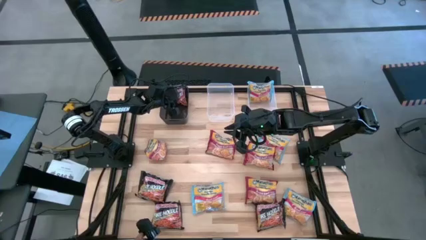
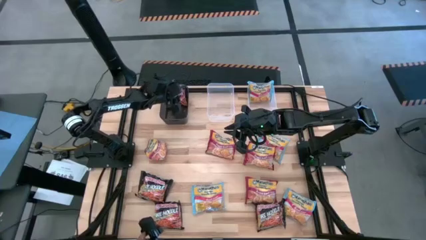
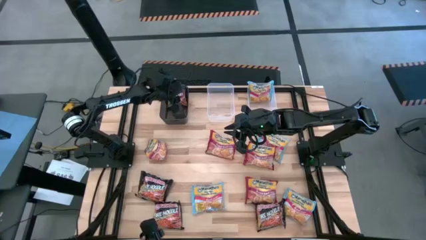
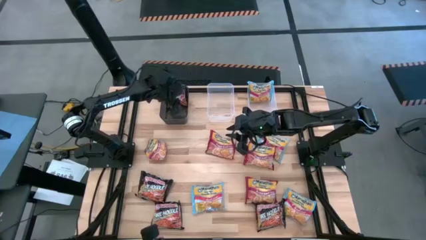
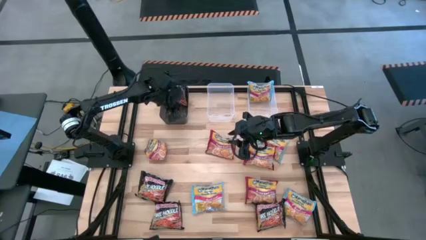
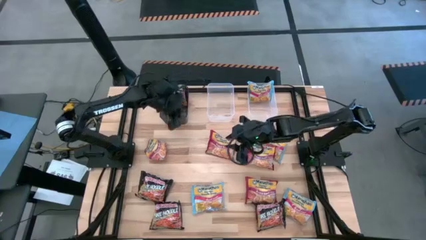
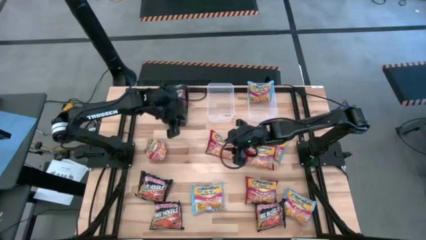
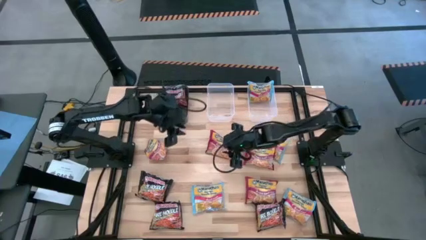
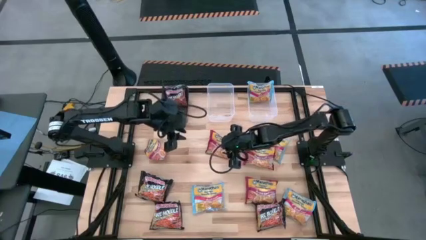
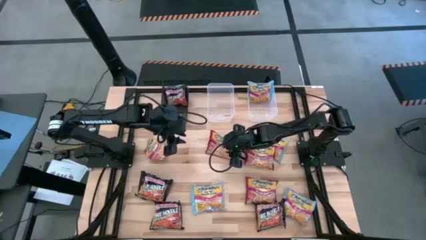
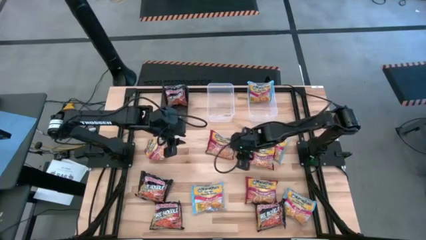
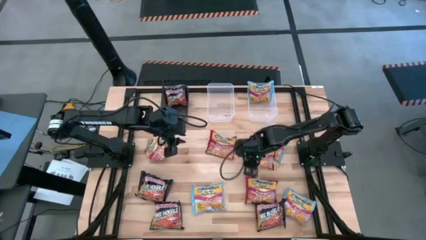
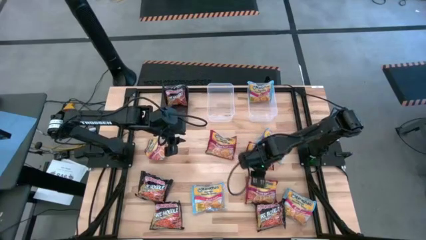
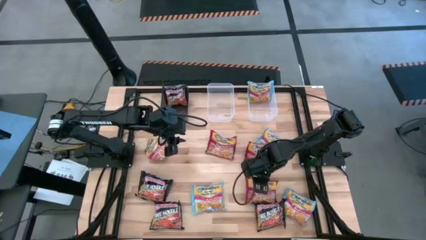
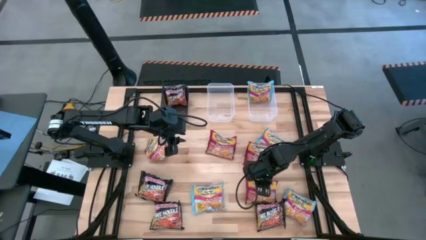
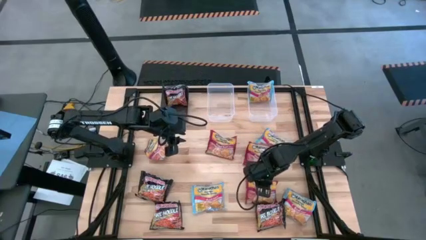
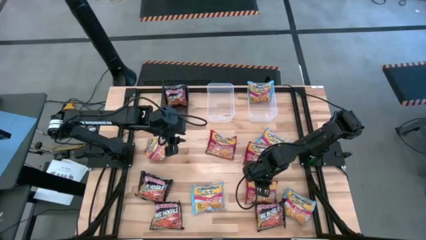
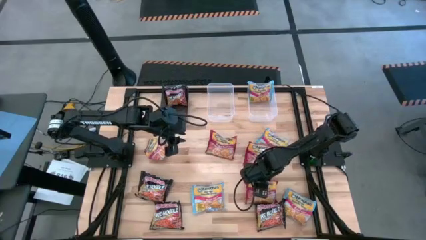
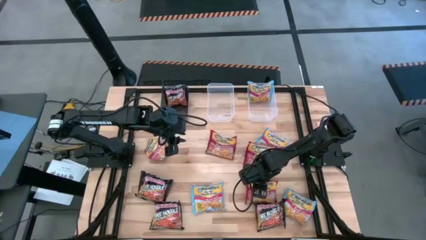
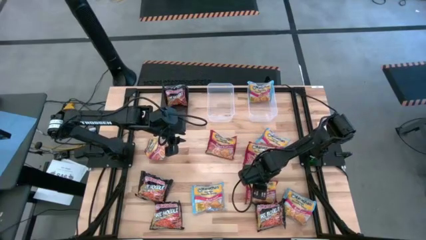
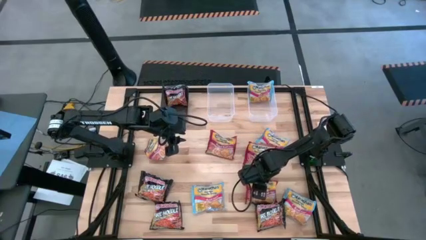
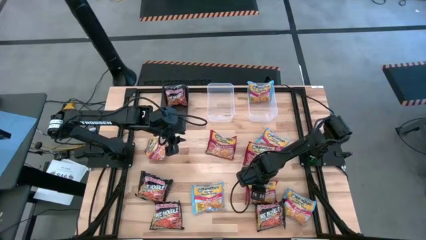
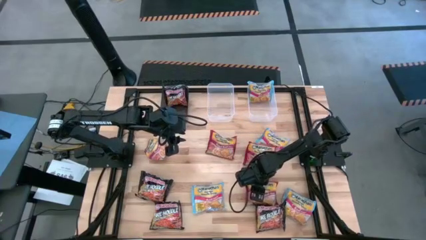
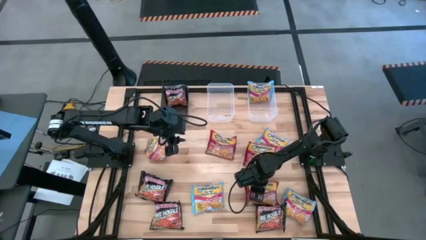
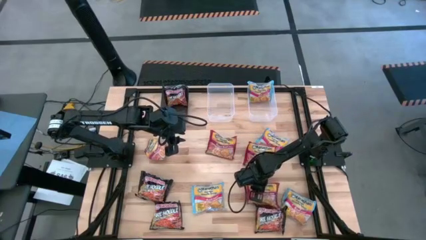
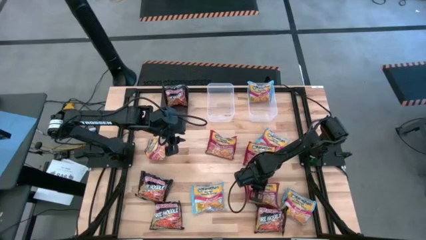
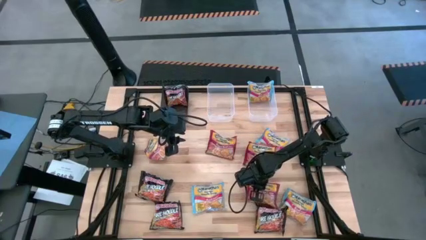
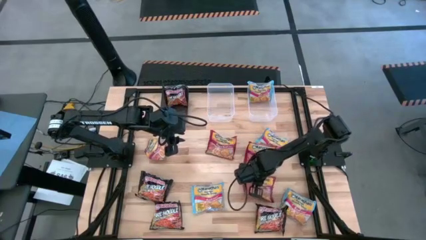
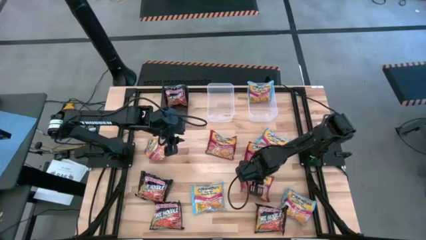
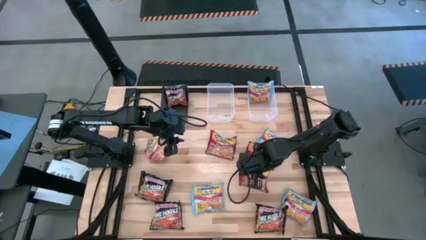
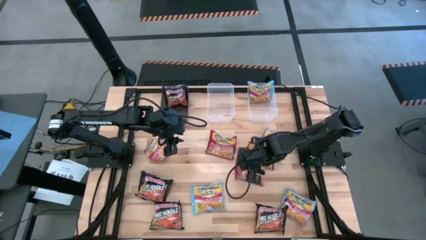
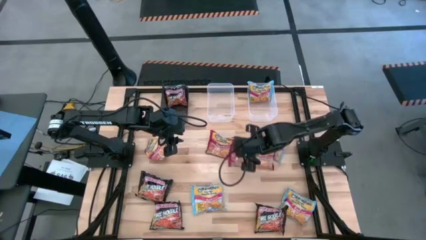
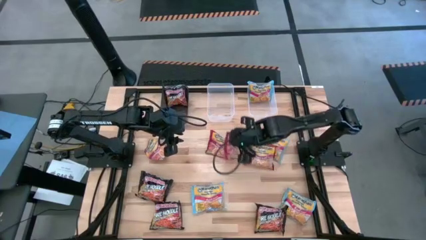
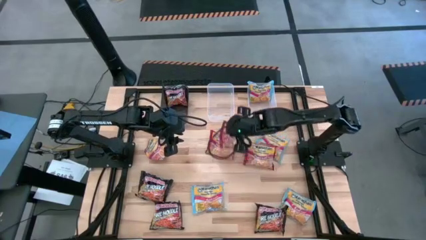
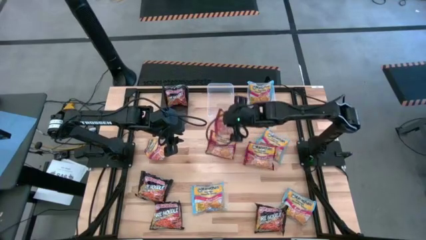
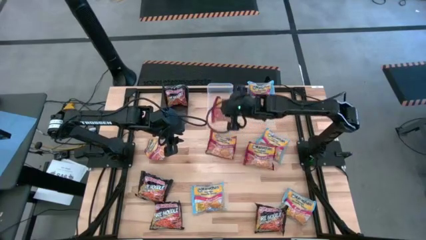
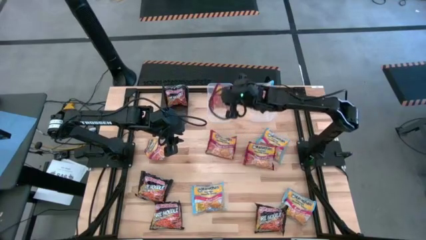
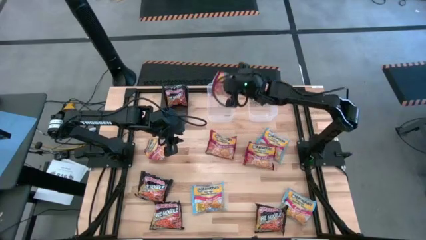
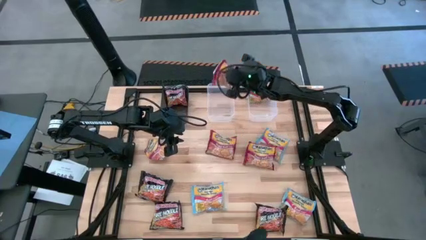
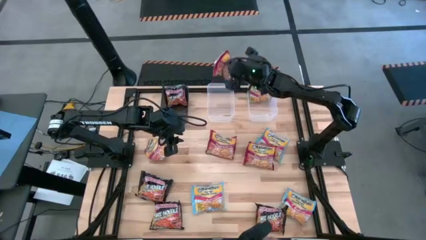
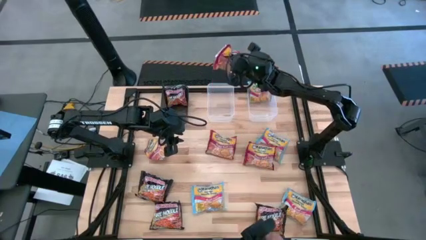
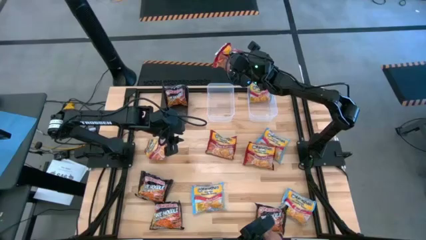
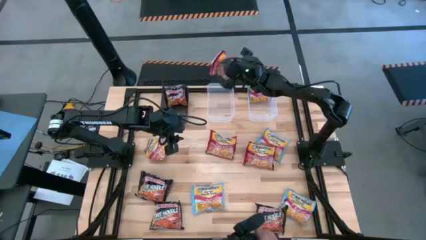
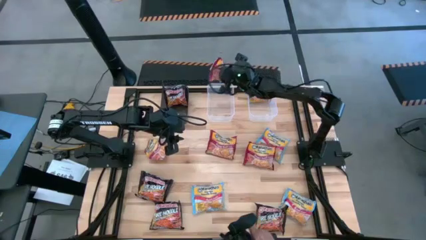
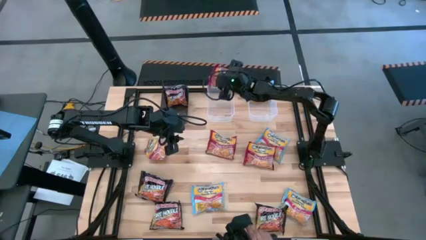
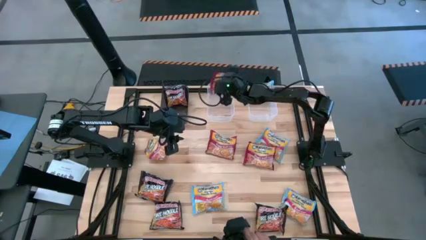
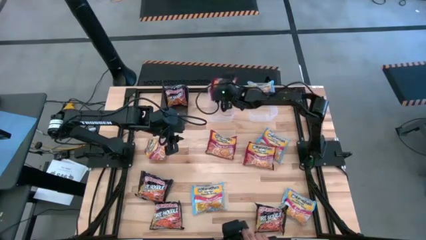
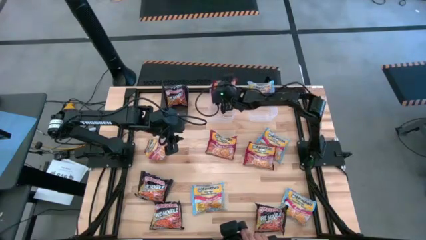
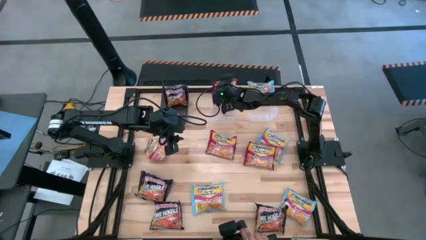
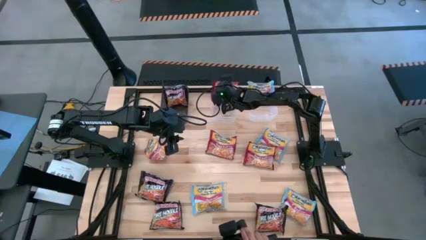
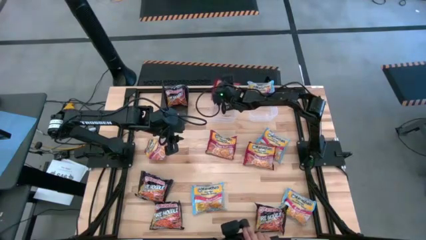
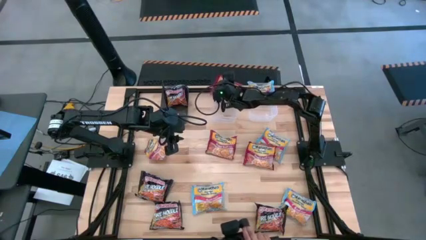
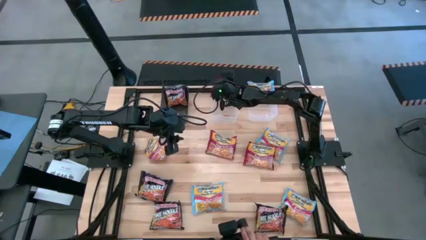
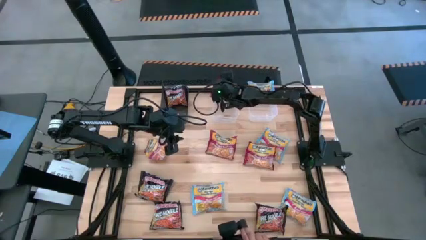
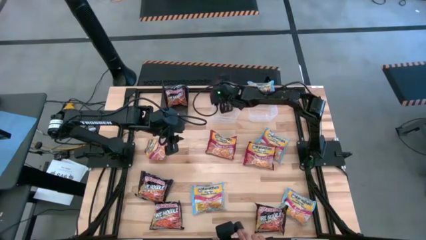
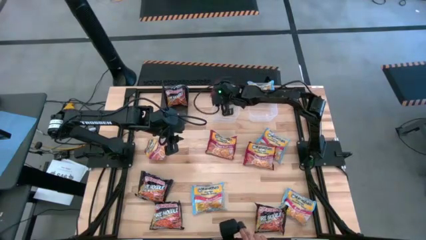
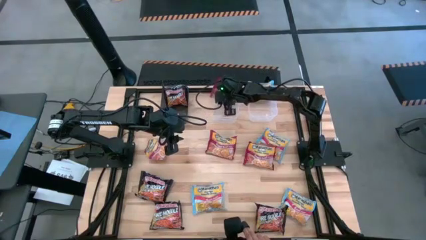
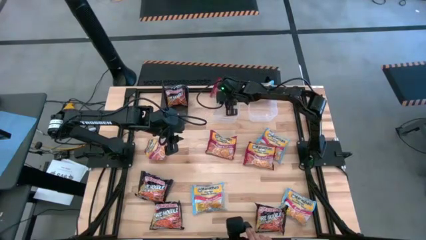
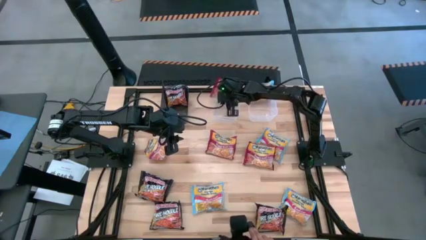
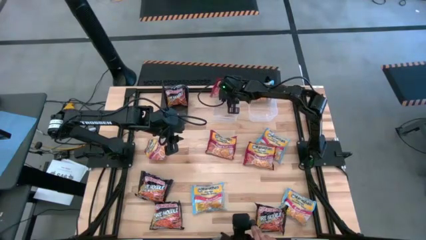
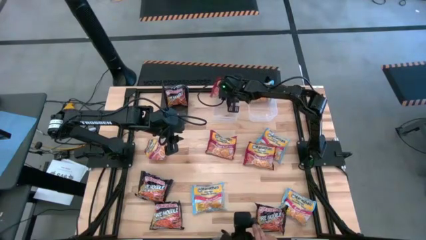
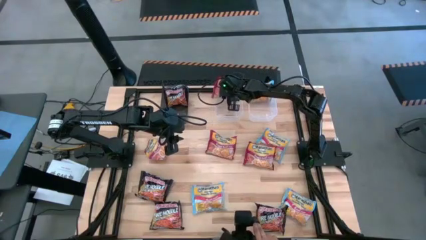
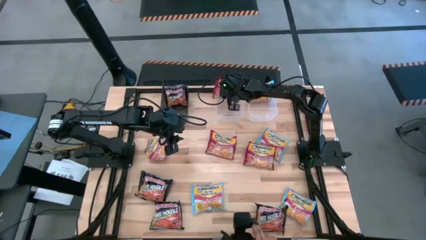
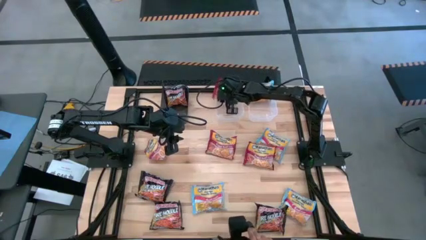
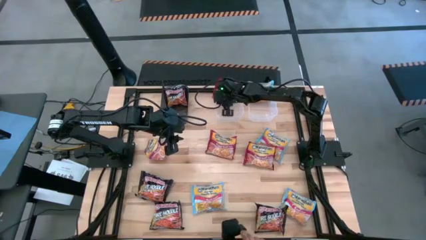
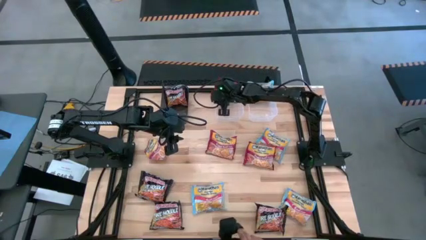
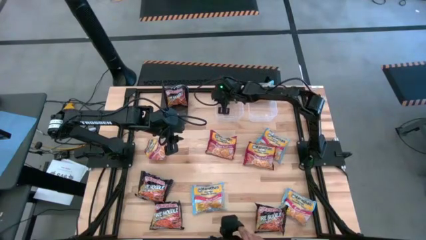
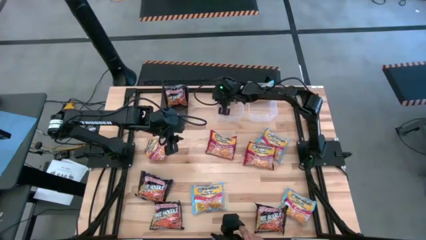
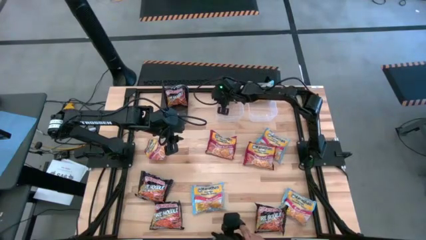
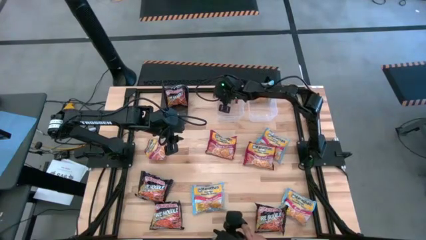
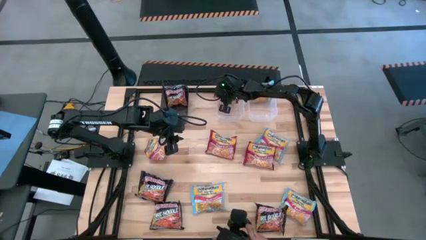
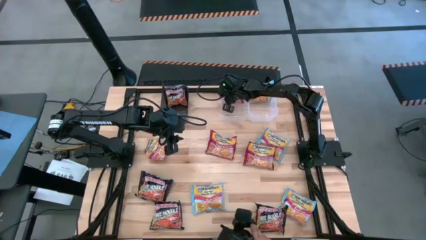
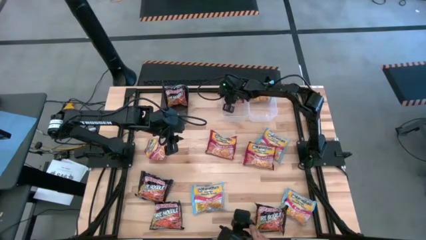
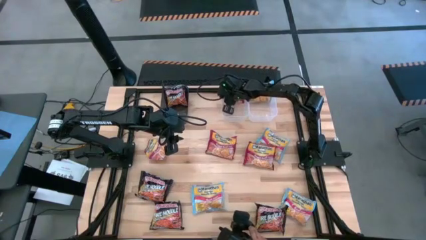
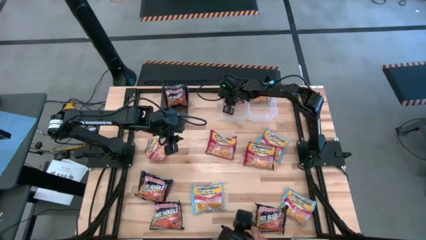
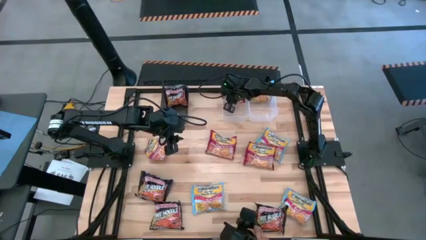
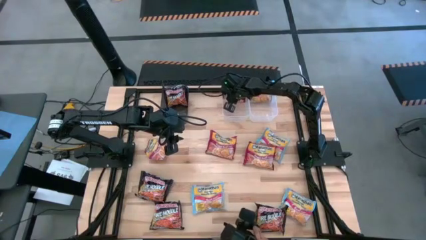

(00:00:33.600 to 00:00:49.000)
Task: Sort Maruchan noodles
Put the red noodle pack into the left transparent bin
